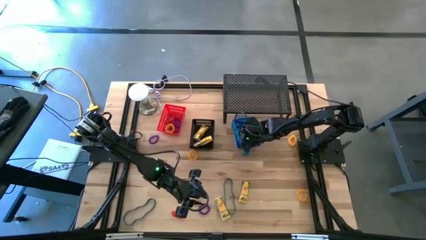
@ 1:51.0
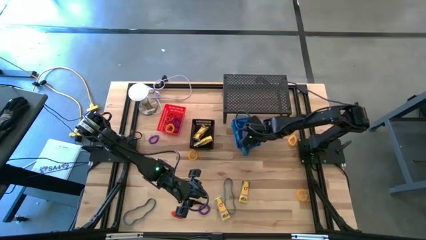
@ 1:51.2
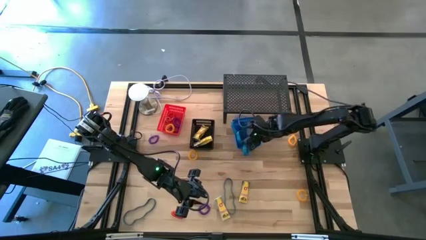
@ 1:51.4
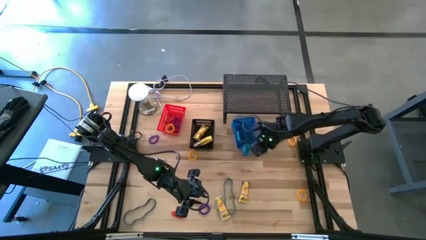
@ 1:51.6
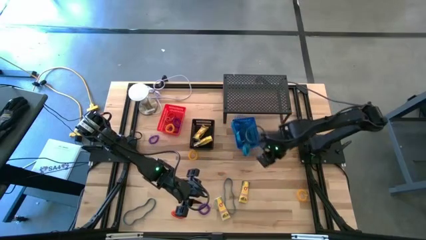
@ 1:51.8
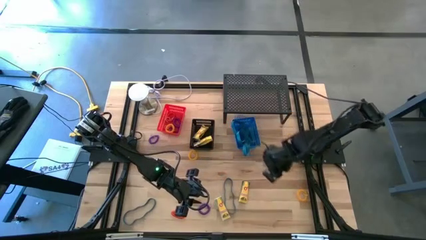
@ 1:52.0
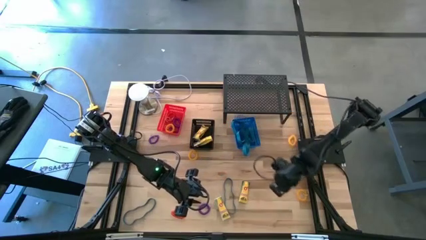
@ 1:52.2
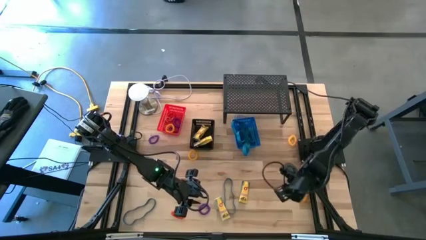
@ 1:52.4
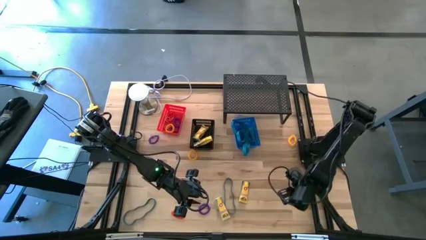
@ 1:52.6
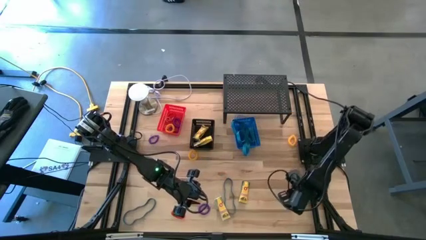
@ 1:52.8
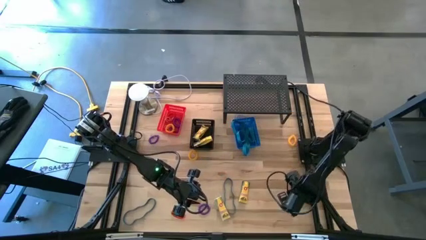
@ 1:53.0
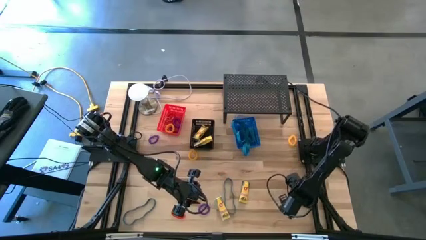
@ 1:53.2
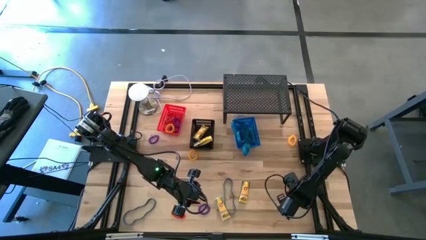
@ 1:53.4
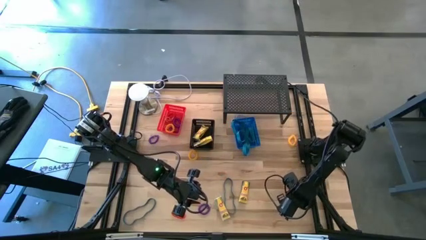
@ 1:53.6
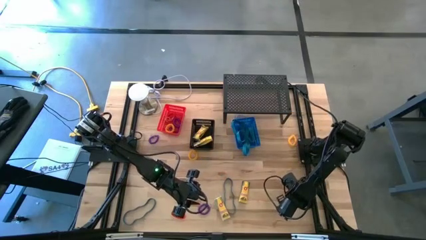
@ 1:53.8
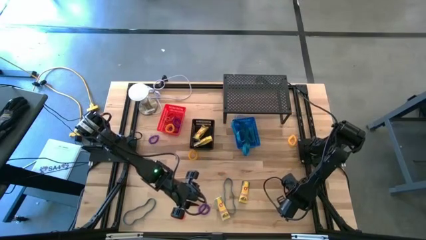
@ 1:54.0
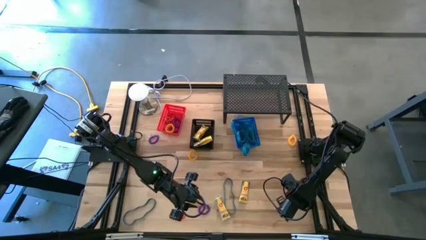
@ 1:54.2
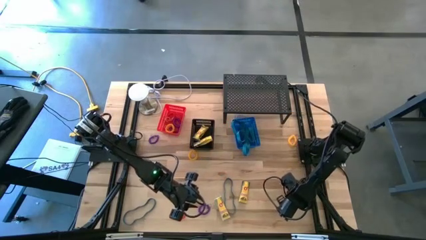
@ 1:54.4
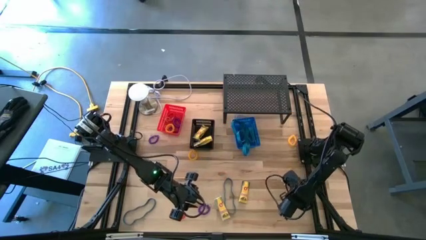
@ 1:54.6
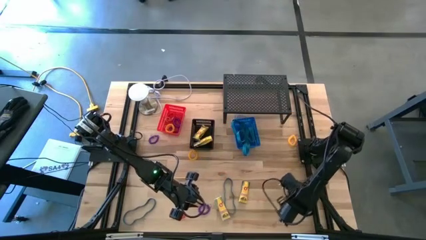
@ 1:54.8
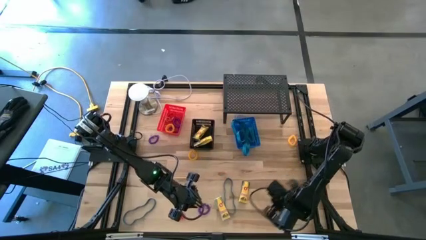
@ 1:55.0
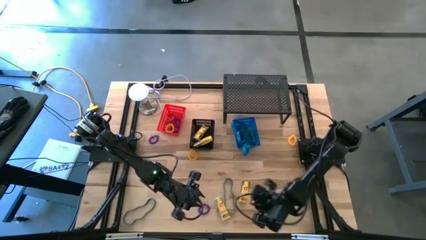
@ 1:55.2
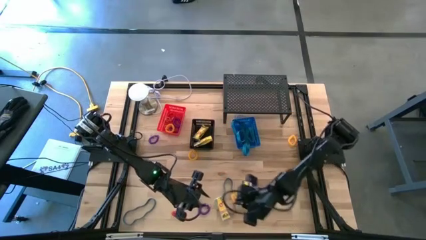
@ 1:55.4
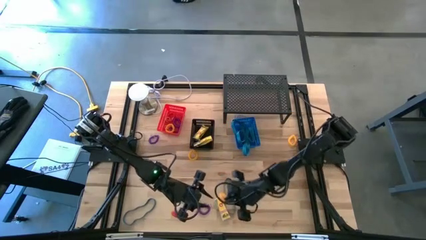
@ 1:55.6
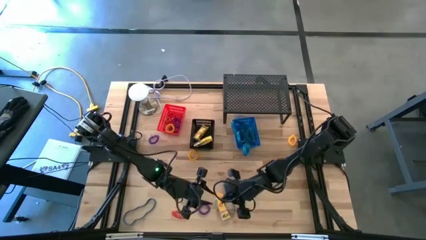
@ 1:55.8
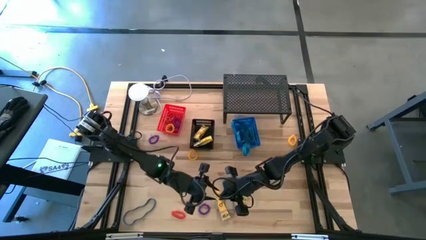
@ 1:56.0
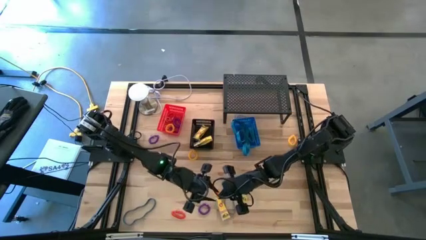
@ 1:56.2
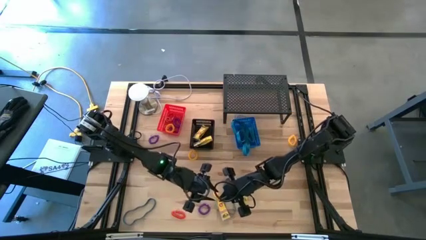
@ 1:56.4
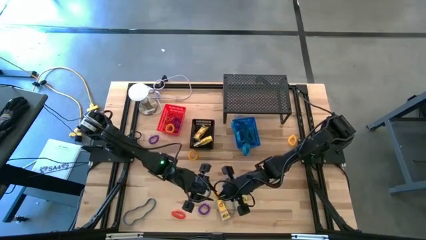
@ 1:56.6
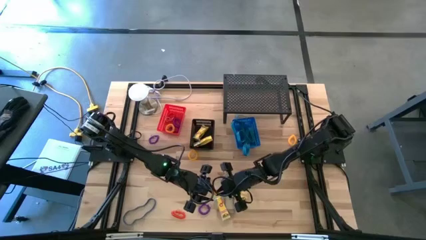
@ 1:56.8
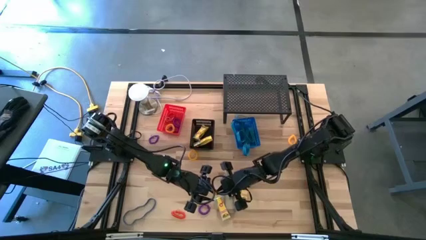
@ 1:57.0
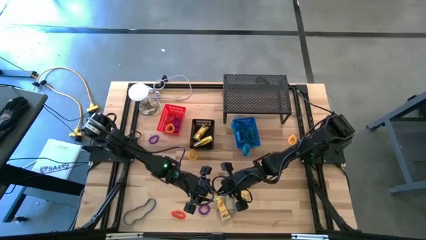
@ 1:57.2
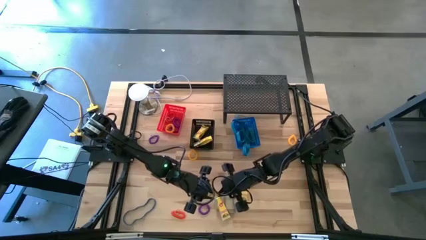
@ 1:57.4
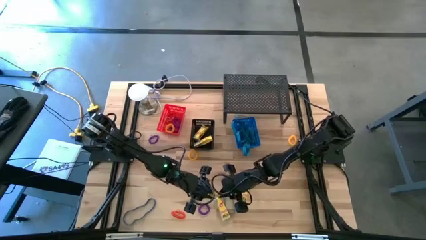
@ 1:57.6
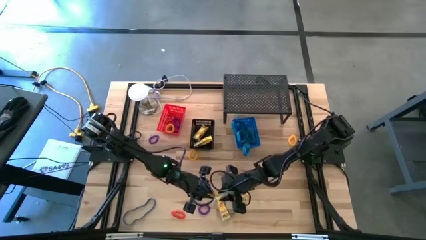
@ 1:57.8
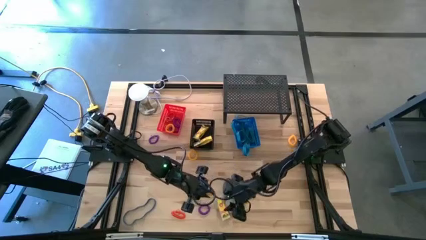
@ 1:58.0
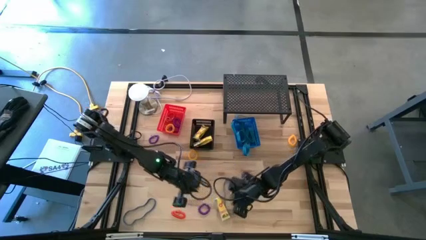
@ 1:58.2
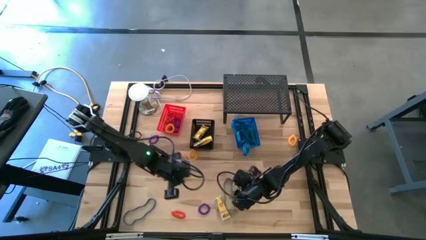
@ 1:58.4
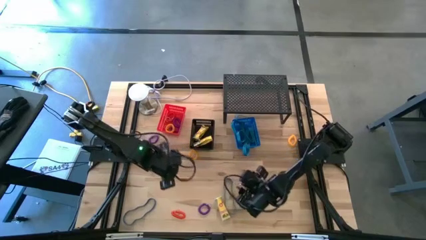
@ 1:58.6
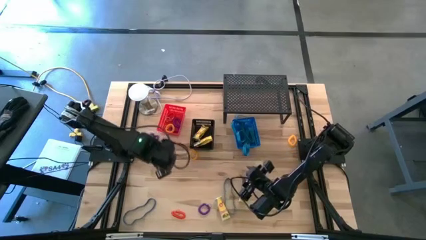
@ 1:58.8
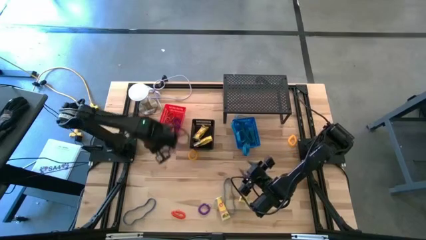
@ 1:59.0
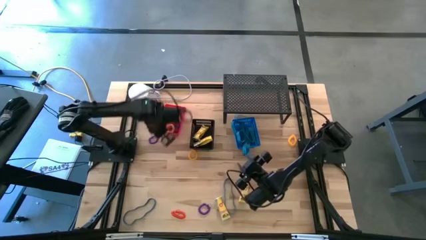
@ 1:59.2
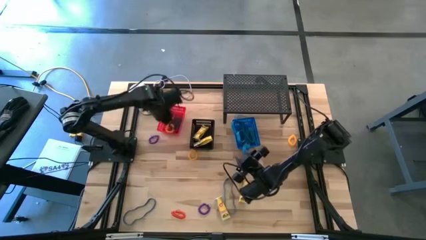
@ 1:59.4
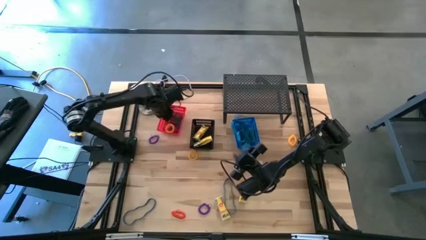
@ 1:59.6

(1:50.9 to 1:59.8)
Task: Pick & Place Office Desk Supplies
Put the bottom right yellow wrist coil keychain into the orange bin

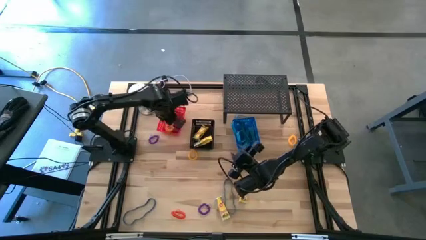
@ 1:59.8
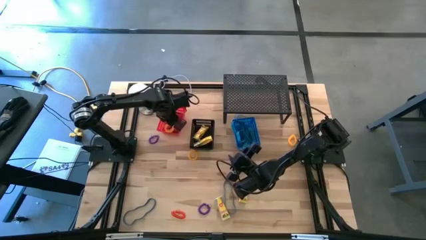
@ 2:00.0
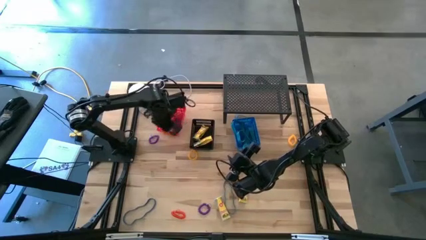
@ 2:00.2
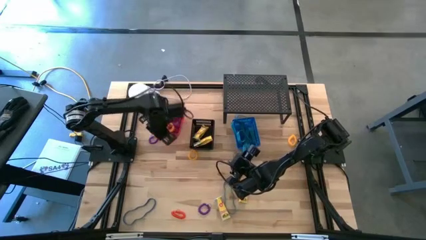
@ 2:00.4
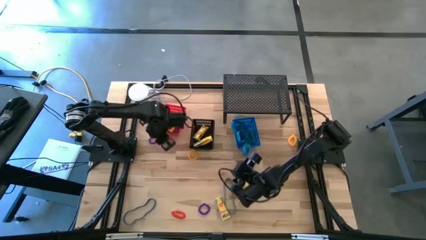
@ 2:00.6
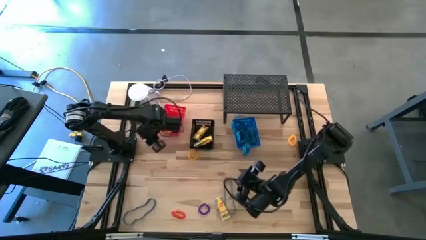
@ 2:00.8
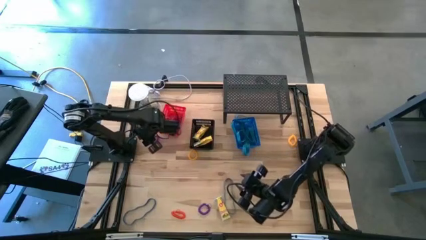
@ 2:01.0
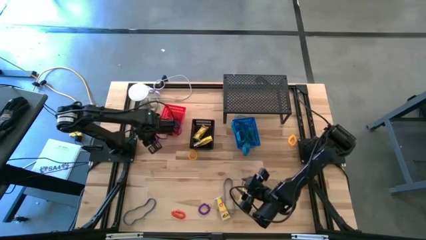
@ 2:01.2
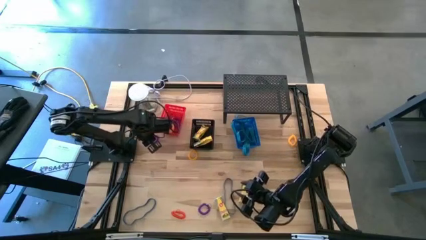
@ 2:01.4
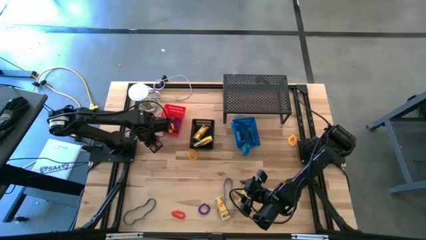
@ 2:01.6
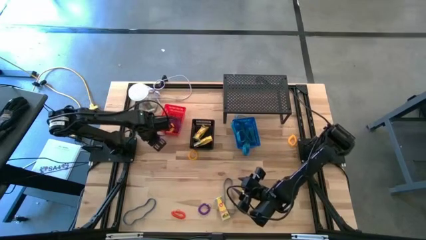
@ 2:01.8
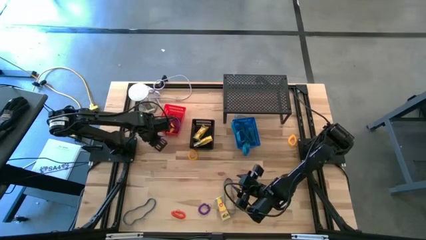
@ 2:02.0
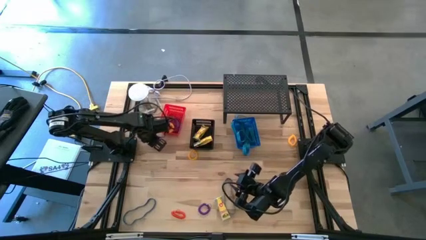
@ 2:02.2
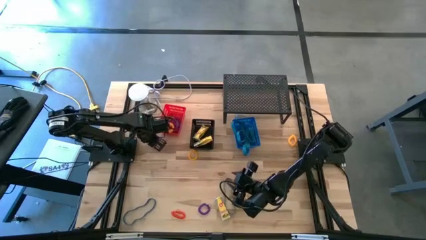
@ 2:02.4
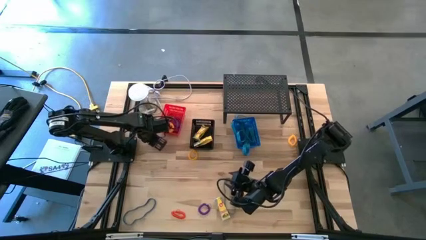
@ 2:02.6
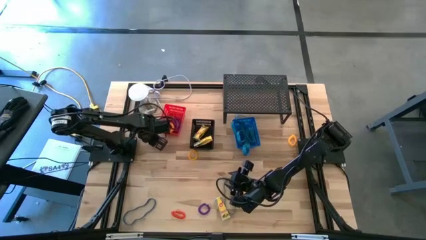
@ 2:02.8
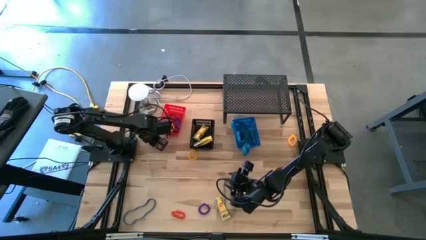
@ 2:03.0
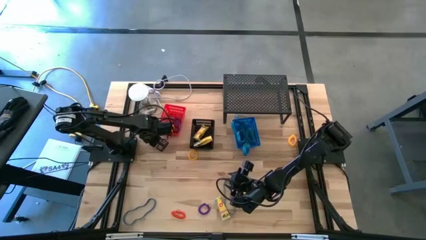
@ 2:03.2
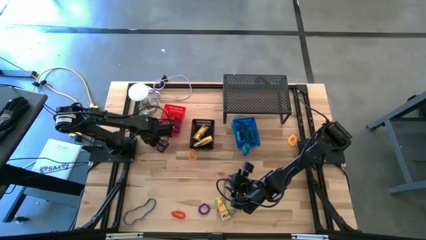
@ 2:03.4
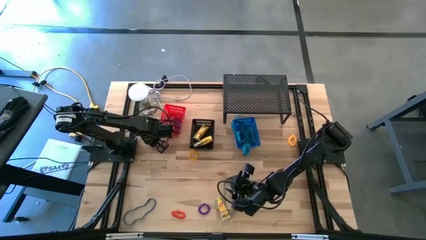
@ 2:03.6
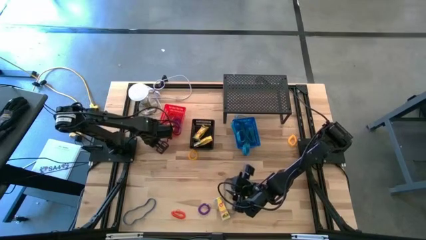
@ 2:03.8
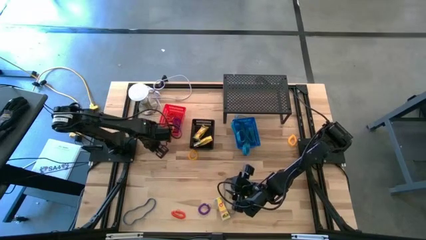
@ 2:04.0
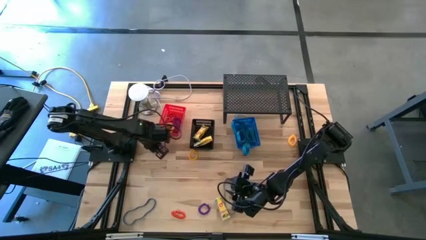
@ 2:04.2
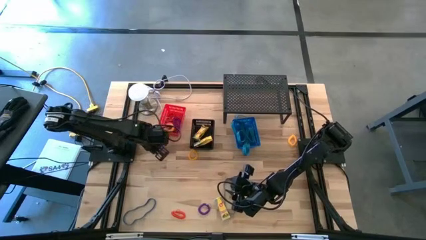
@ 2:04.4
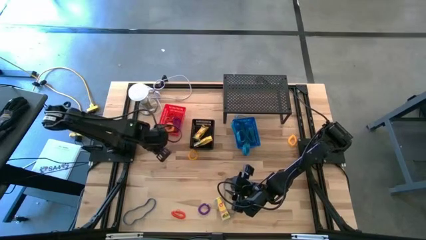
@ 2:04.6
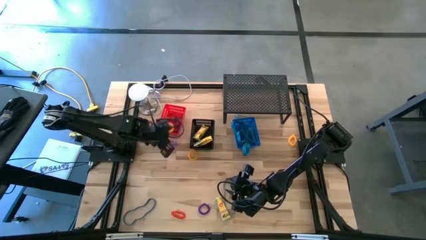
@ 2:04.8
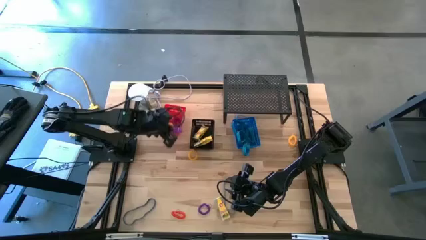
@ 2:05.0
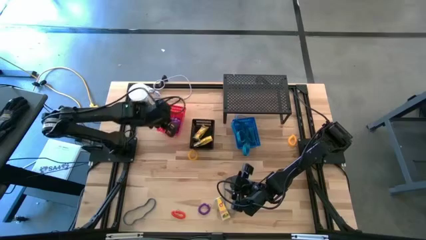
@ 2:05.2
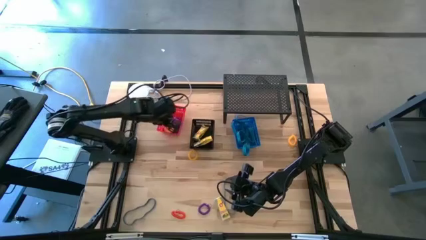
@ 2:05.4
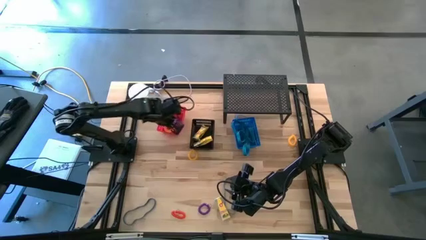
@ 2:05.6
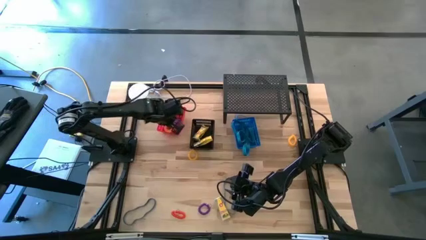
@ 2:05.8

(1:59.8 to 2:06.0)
Put the top purple wrist coil keychain into the orange bin

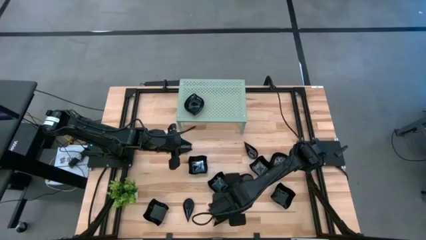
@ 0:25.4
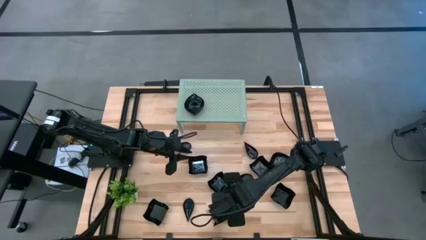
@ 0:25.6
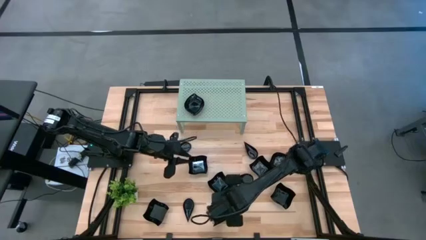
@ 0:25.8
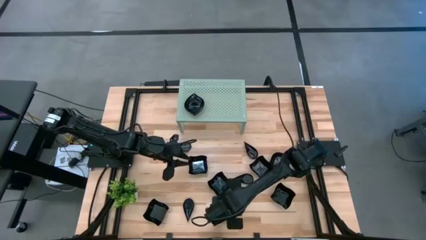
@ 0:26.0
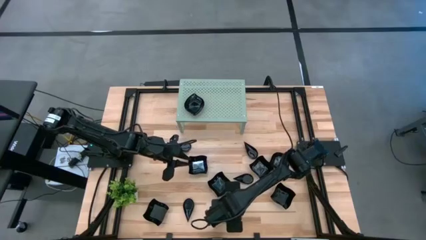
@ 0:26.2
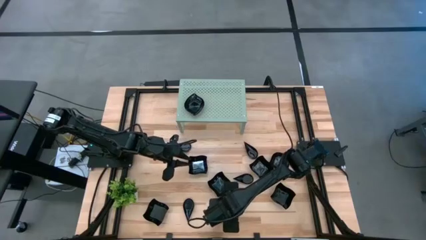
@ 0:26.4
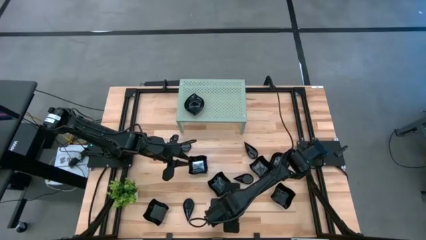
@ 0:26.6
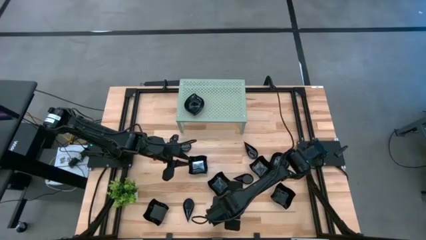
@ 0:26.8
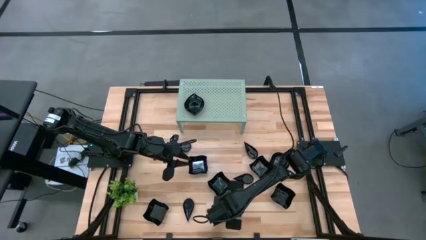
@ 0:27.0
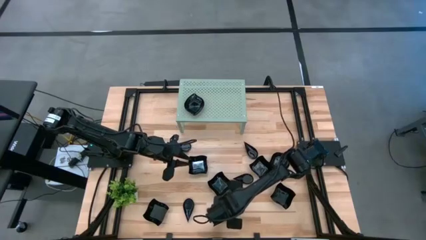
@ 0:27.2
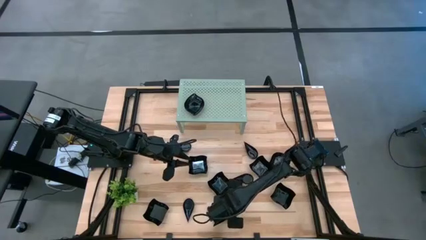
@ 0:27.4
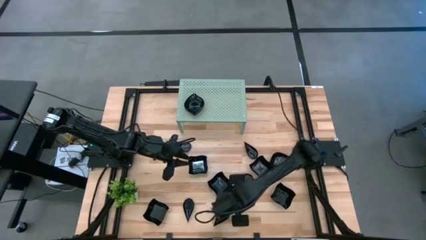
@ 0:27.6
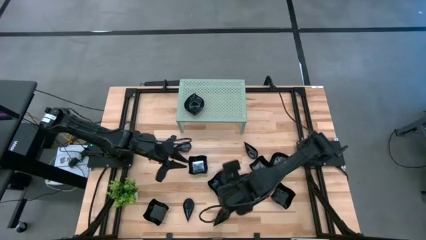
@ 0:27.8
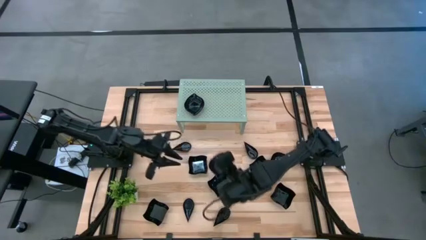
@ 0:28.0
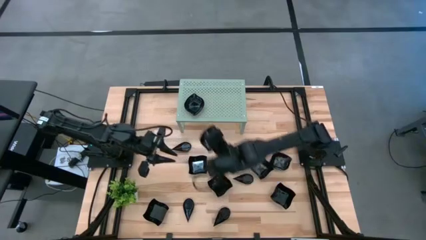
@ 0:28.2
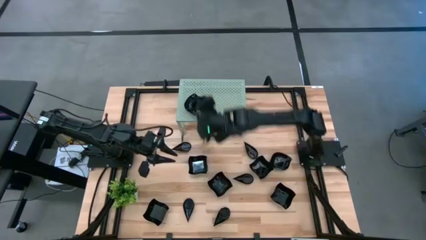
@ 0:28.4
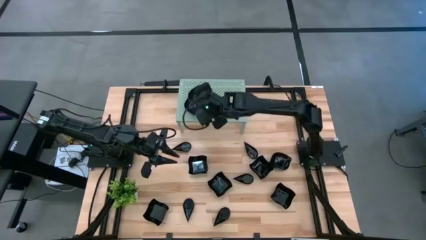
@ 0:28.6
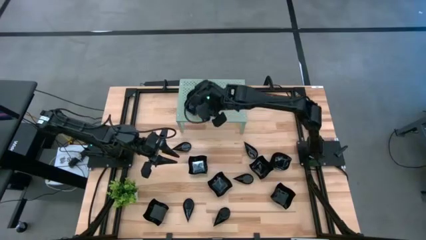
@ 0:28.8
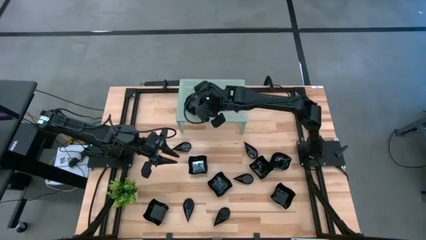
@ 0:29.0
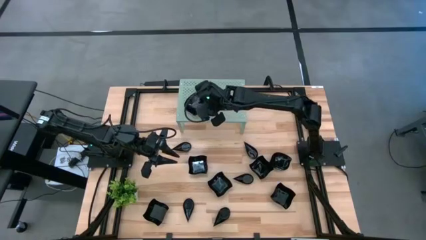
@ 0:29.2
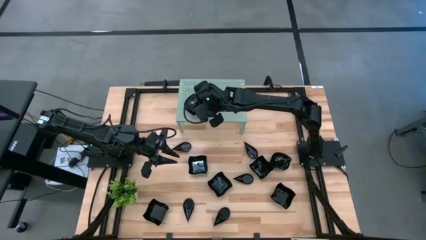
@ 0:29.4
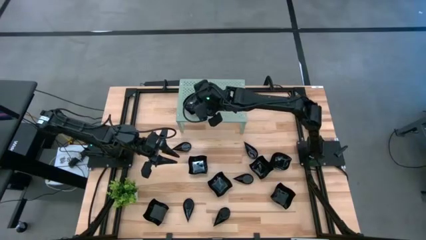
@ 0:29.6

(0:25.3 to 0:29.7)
Task: Pick & Place Mini shaped plates
Stack the leaf-shaped plate on top of the other leaf-shaped plate on the shelf
